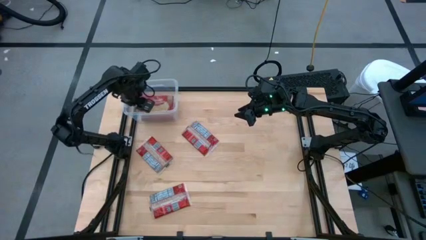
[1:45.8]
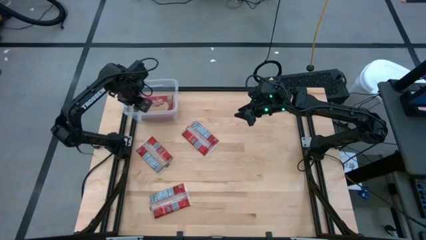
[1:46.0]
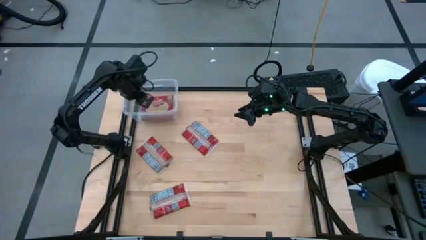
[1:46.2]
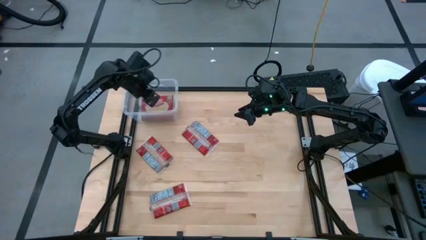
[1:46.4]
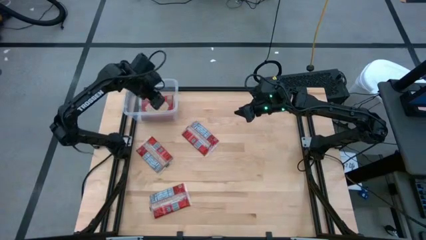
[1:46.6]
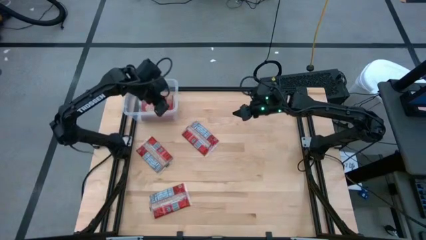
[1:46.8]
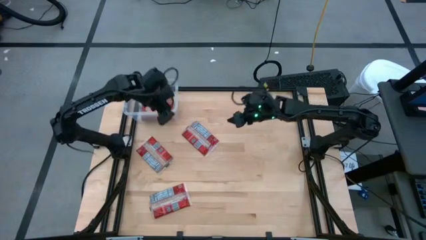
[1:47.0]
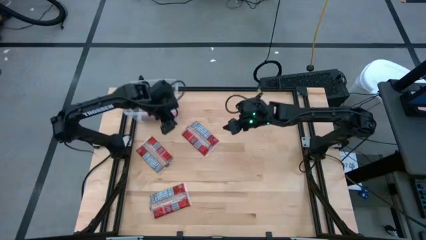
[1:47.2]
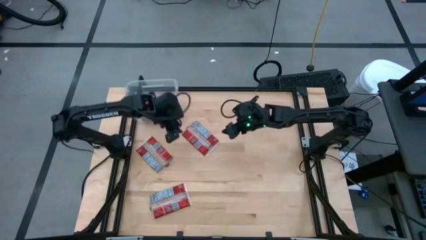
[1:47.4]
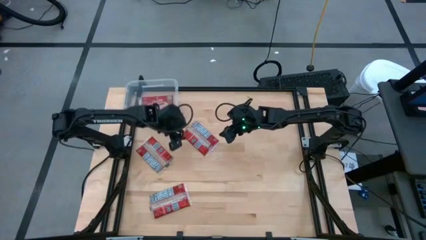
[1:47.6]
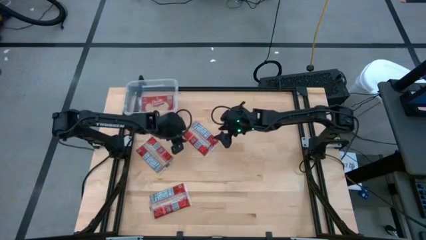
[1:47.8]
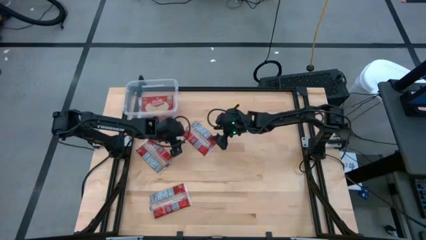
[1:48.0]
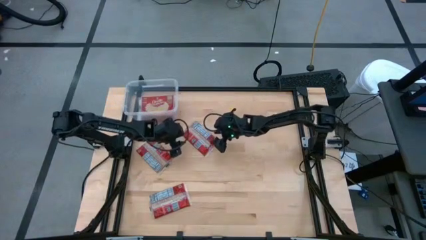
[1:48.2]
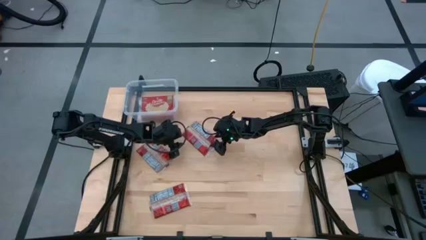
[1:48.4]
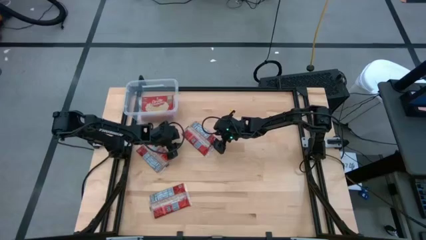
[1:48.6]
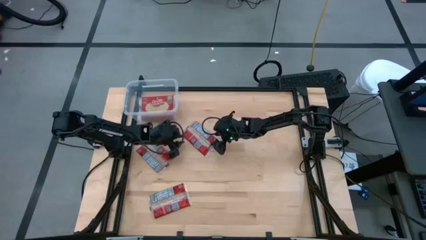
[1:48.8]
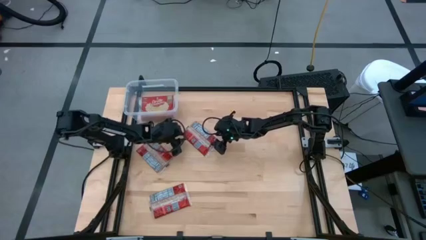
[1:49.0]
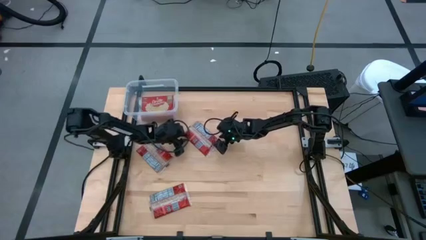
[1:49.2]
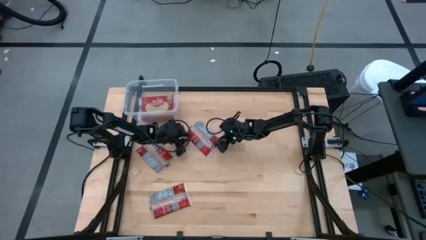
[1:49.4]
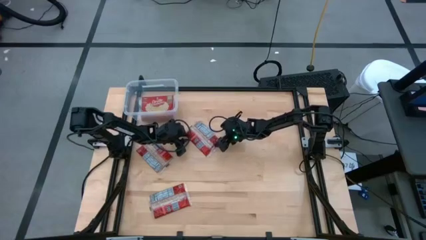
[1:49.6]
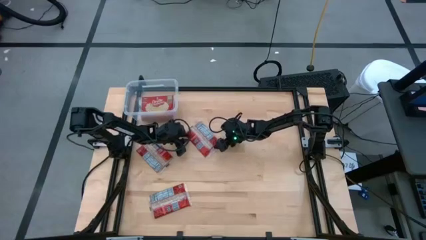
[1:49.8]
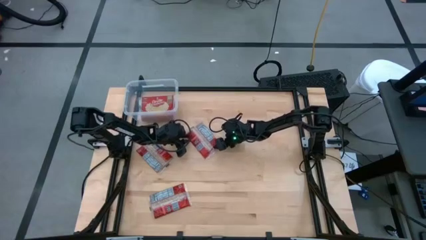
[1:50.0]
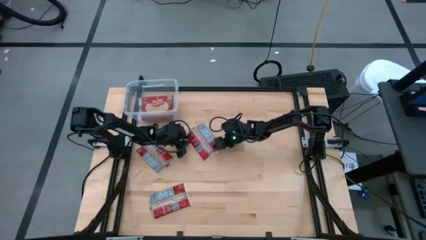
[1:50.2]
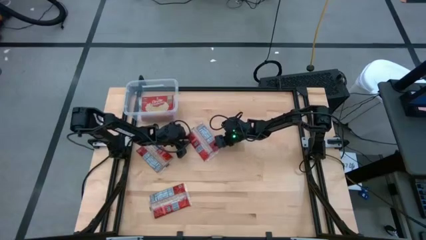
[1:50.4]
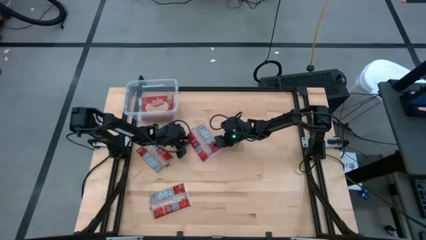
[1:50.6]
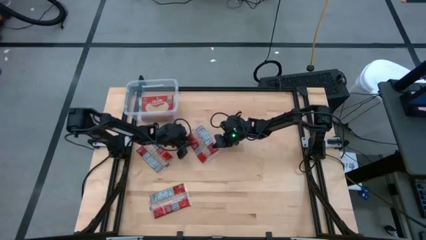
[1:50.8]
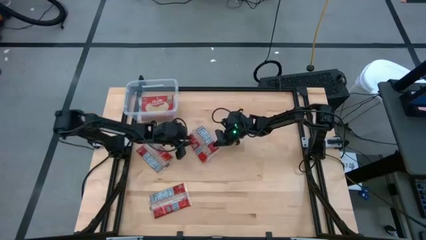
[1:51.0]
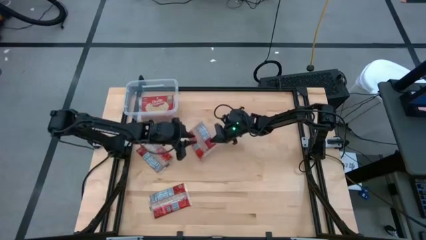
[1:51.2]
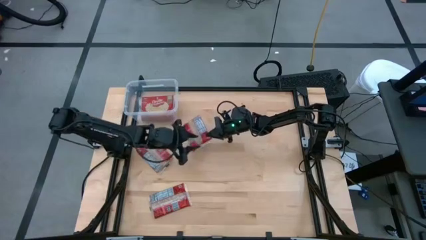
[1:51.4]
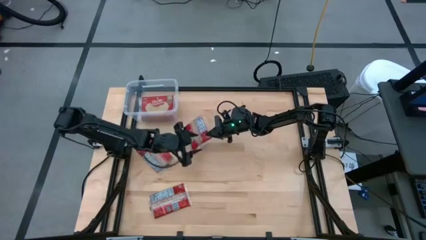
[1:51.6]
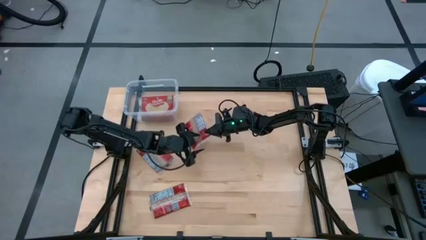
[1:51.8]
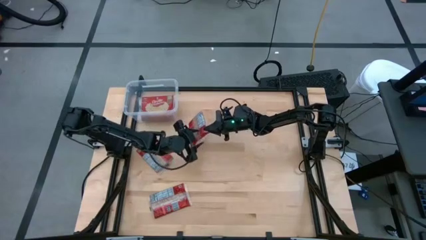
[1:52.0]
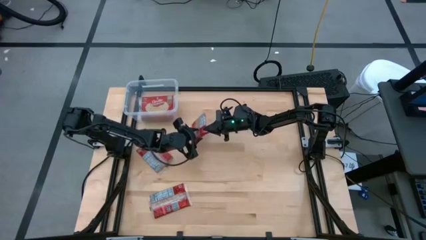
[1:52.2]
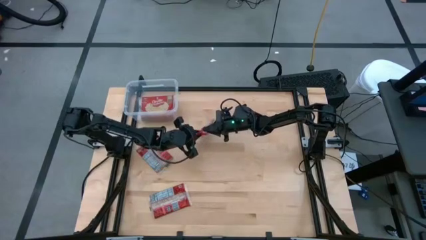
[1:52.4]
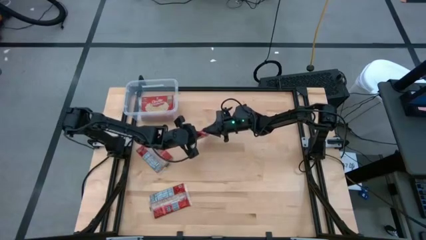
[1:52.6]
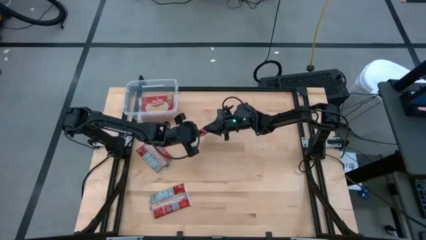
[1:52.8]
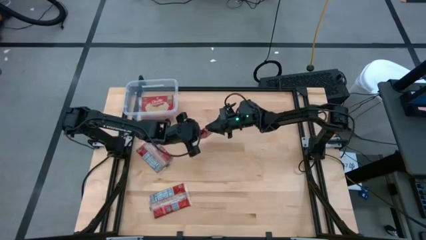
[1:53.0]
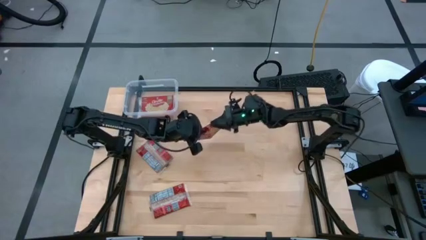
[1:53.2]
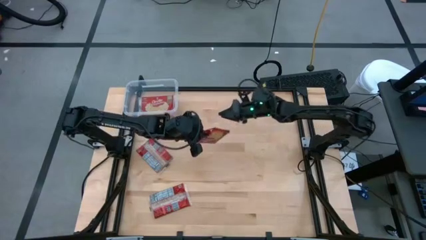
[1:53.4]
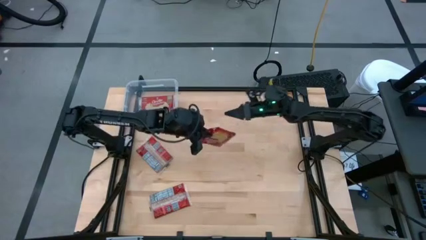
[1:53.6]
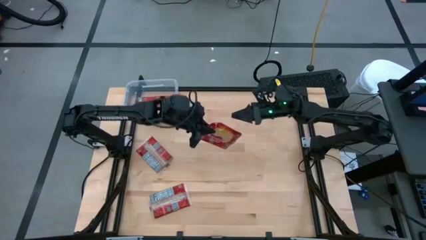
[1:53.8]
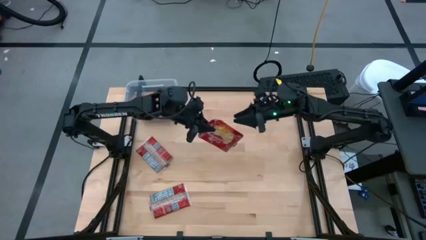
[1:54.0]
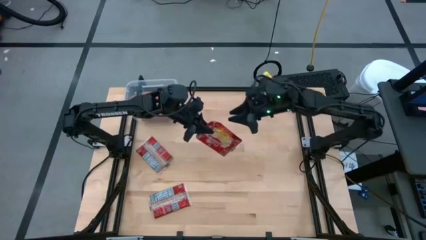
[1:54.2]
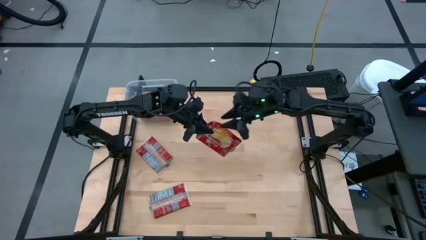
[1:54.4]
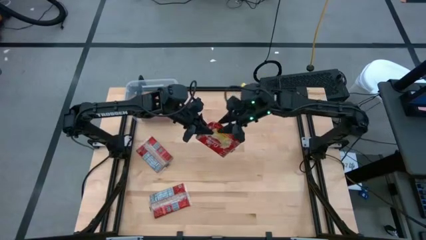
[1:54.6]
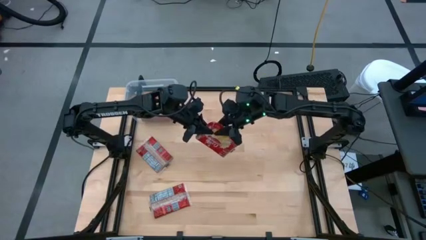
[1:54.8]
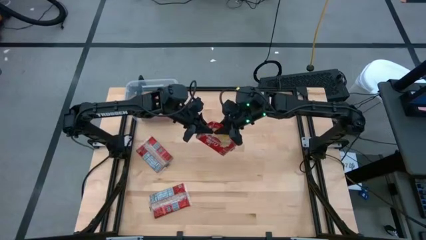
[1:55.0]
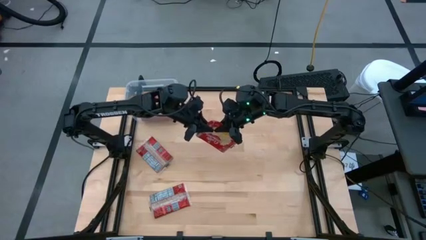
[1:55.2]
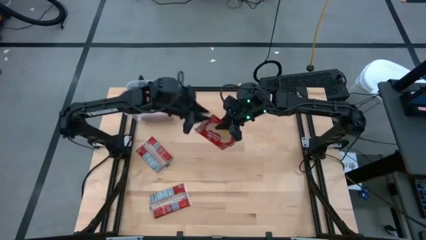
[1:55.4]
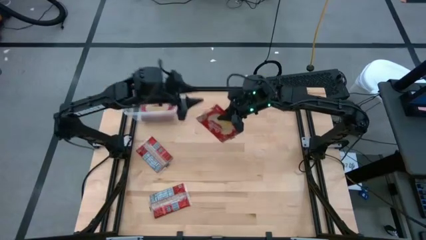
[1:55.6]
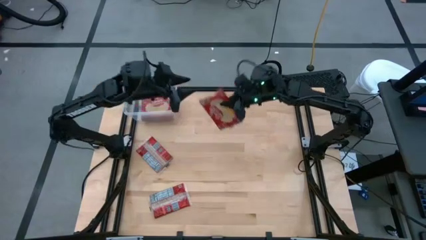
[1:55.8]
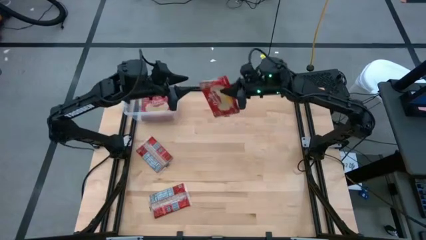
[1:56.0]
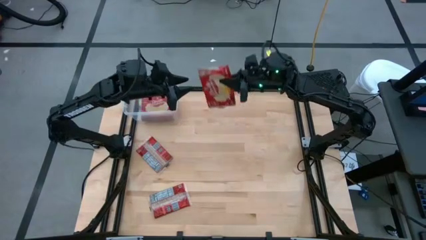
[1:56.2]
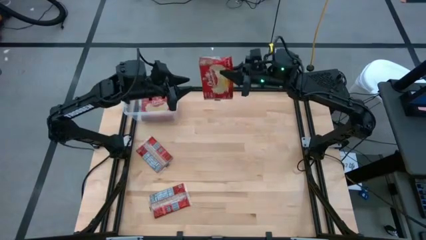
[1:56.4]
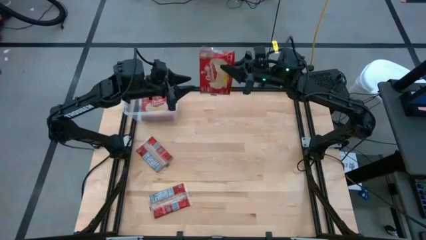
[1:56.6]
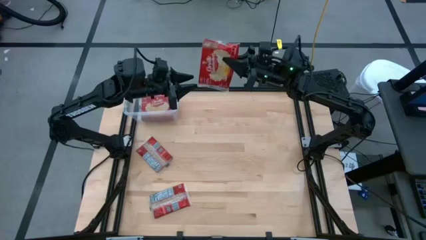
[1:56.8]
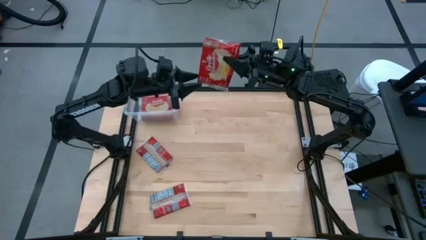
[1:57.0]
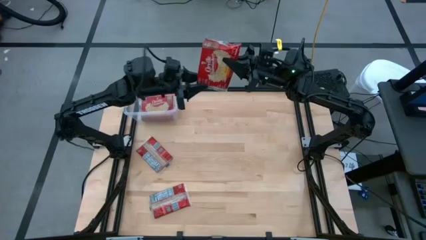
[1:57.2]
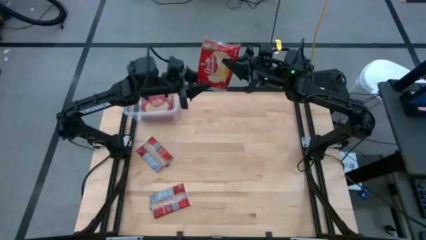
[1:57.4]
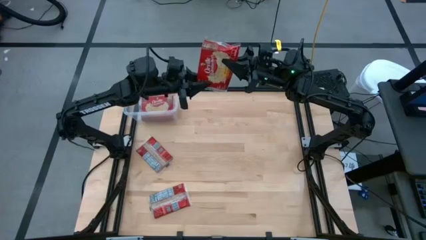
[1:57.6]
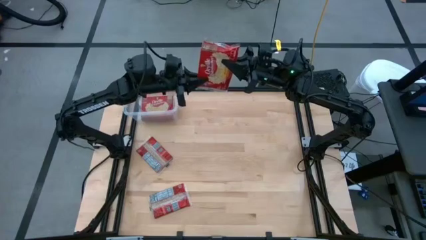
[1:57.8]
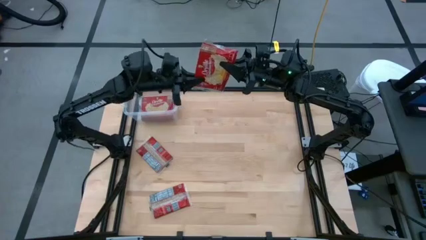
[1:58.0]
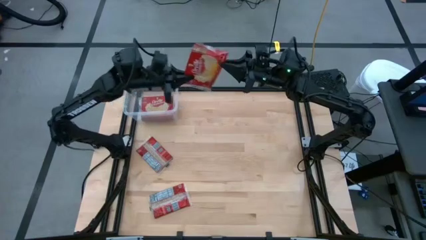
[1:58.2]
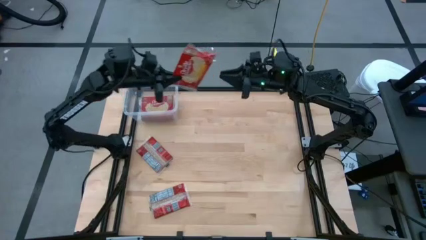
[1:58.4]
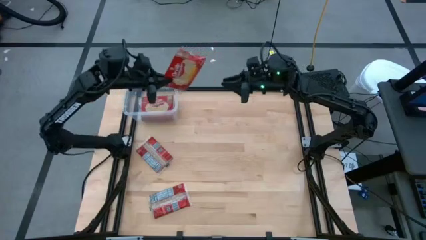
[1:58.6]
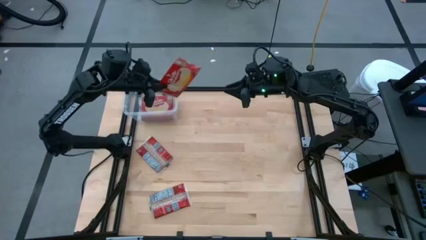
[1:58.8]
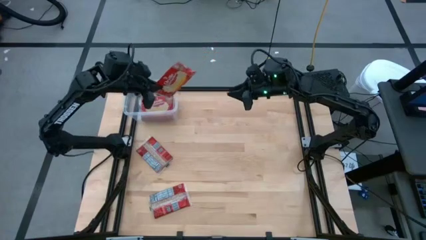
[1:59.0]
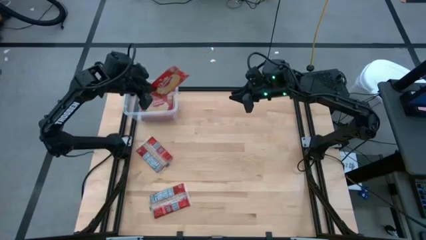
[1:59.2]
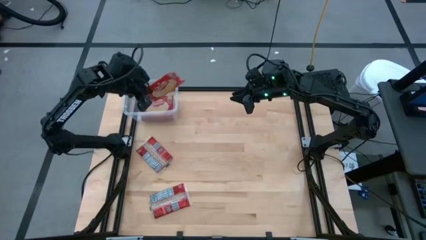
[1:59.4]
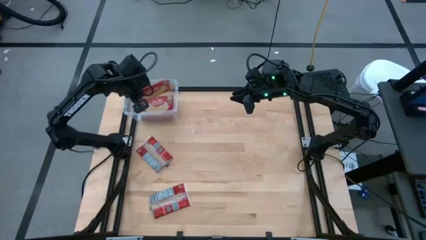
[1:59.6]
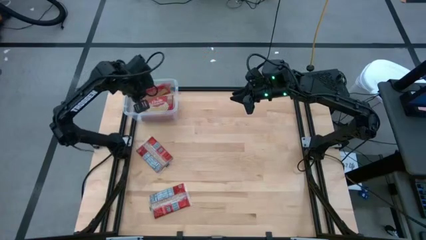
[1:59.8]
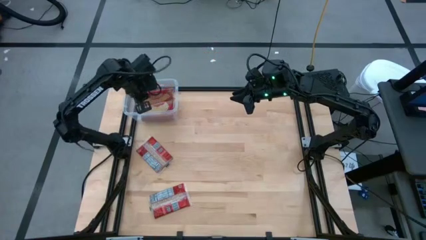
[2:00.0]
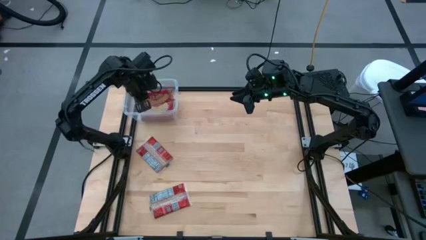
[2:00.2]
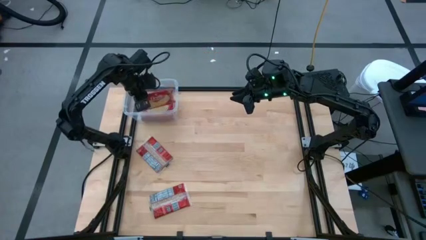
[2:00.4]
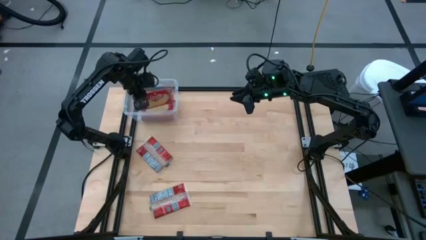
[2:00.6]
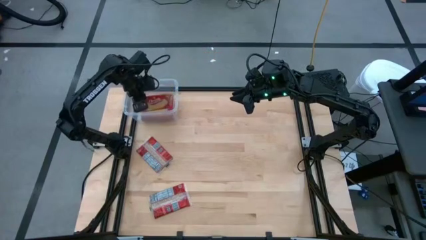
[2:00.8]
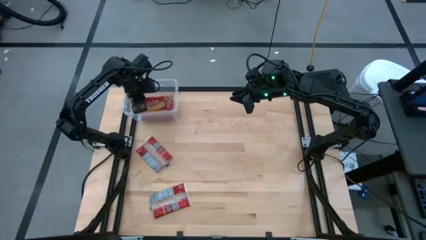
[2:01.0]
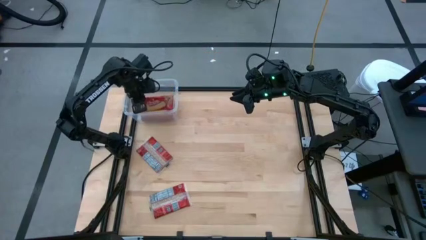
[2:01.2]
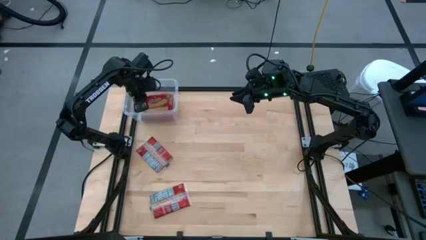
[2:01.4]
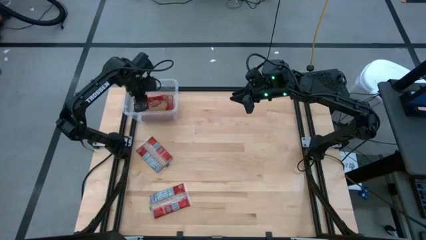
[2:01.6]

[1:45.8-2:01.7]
Task: Sort popcorn bags into baskets
Put the popcorn pack into the transparent bin
